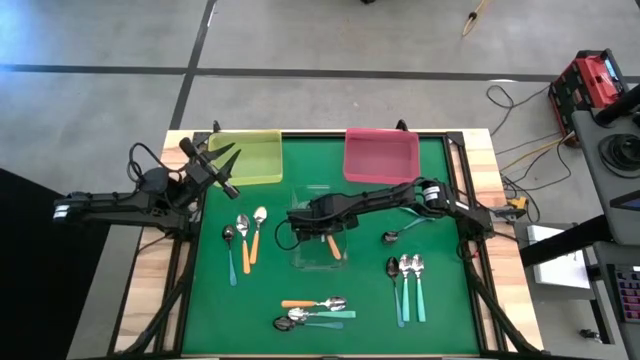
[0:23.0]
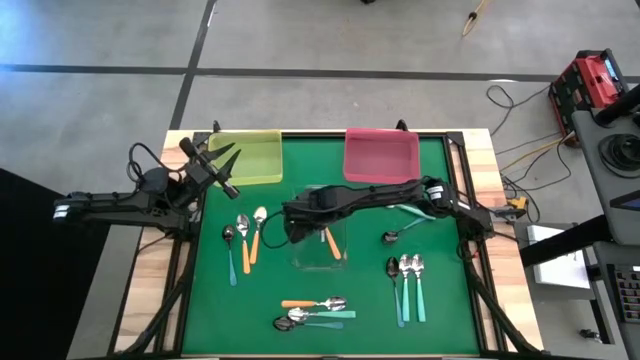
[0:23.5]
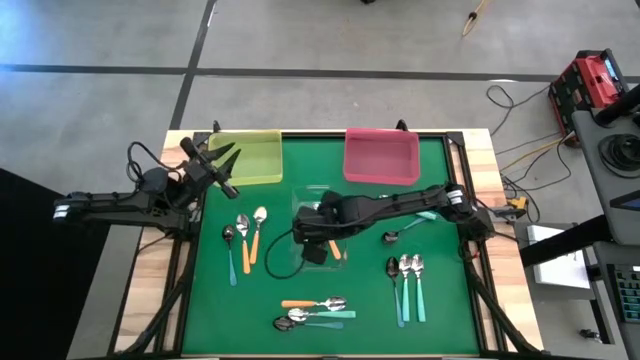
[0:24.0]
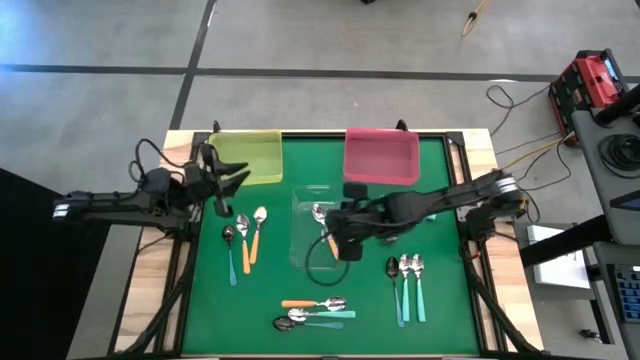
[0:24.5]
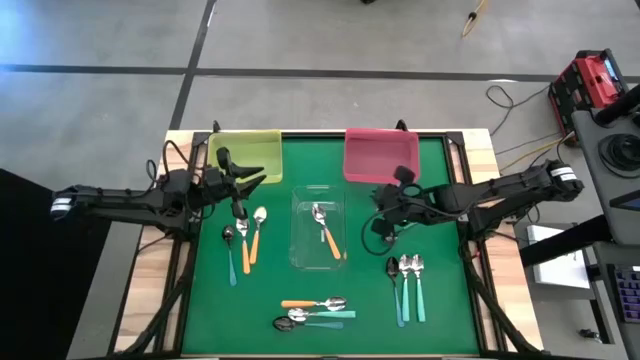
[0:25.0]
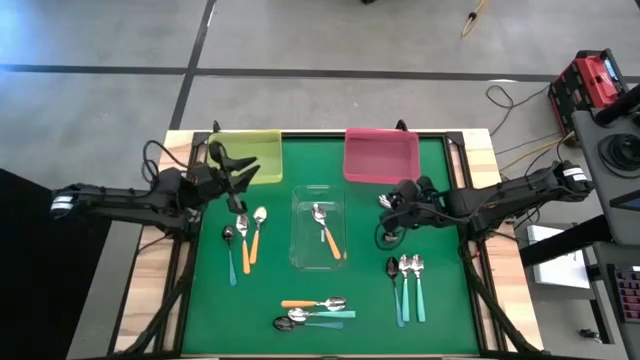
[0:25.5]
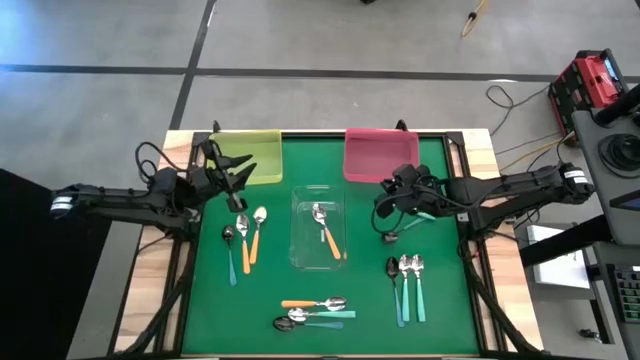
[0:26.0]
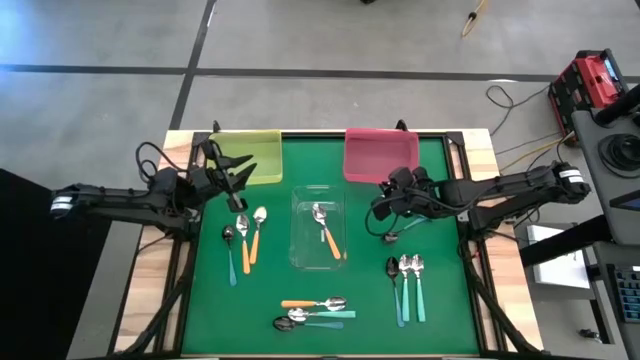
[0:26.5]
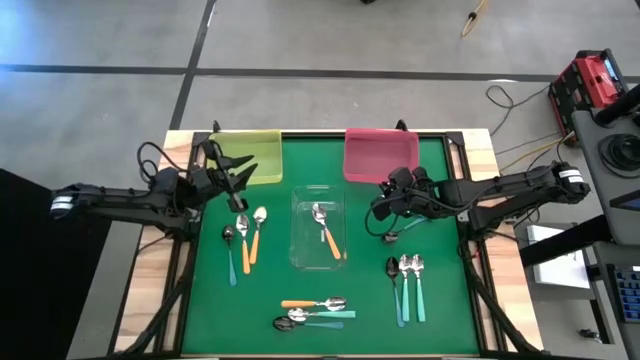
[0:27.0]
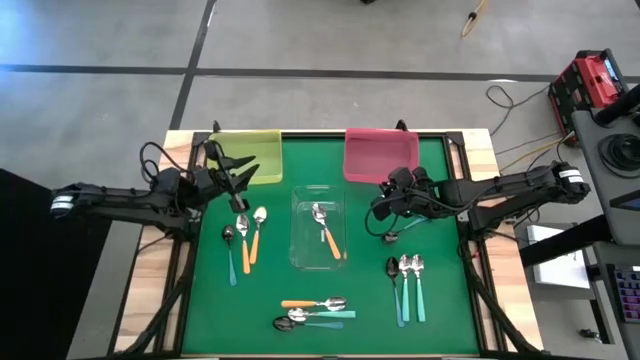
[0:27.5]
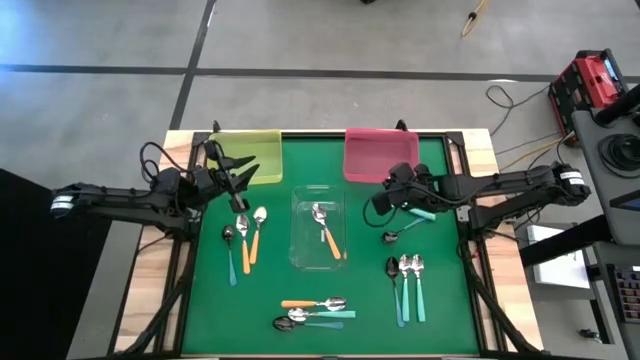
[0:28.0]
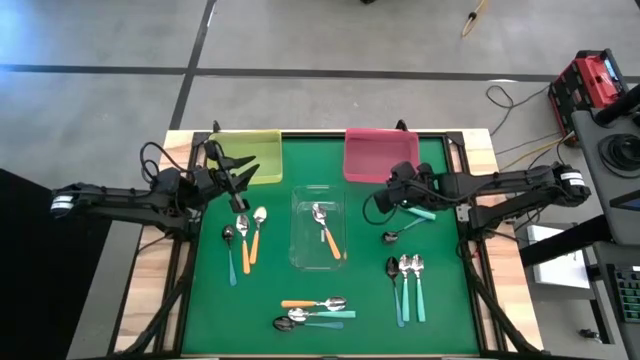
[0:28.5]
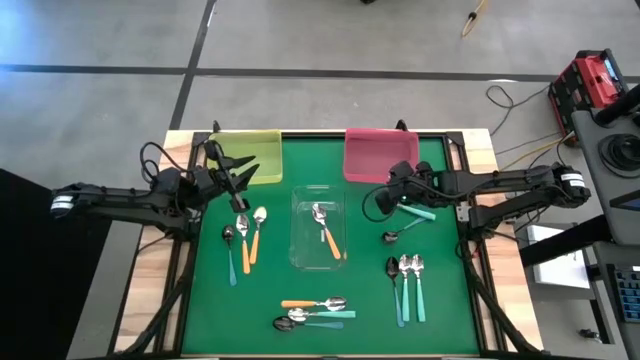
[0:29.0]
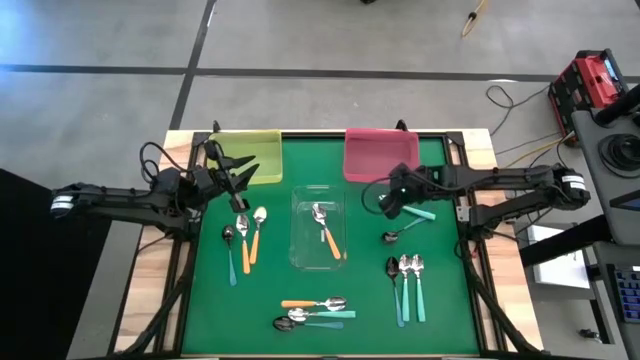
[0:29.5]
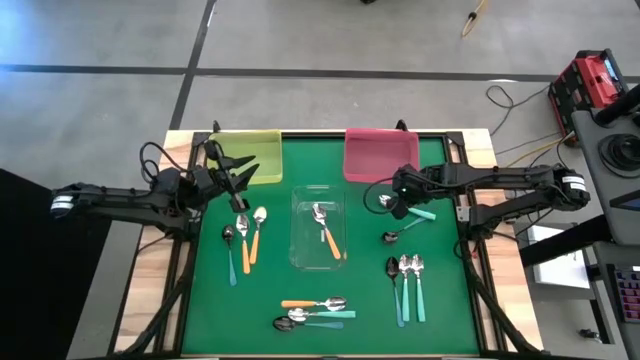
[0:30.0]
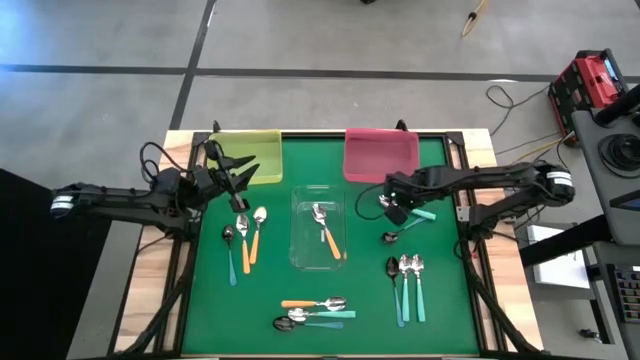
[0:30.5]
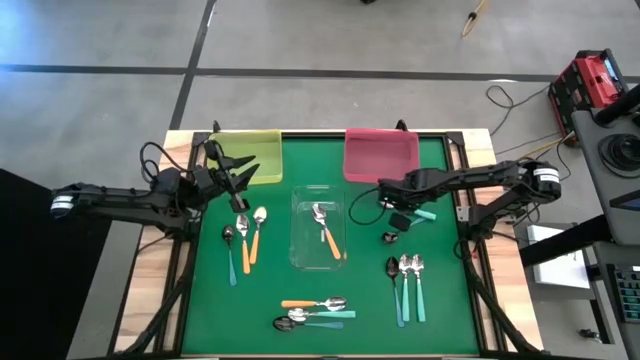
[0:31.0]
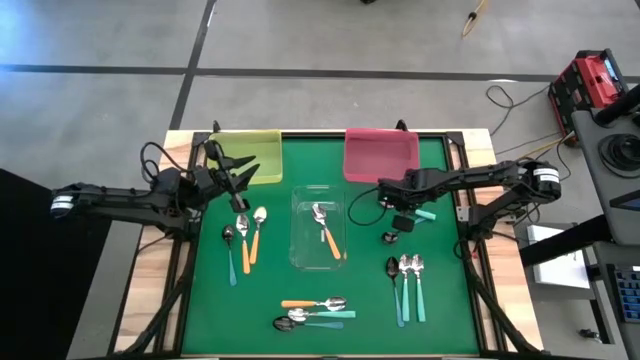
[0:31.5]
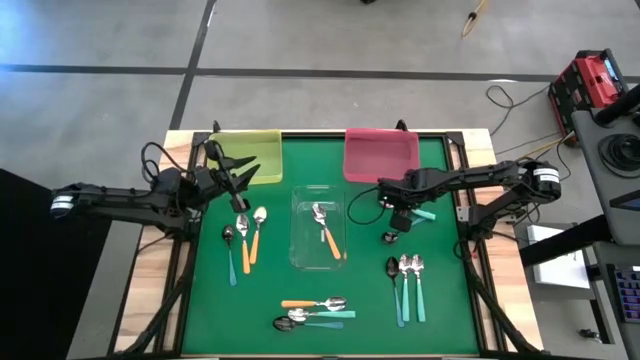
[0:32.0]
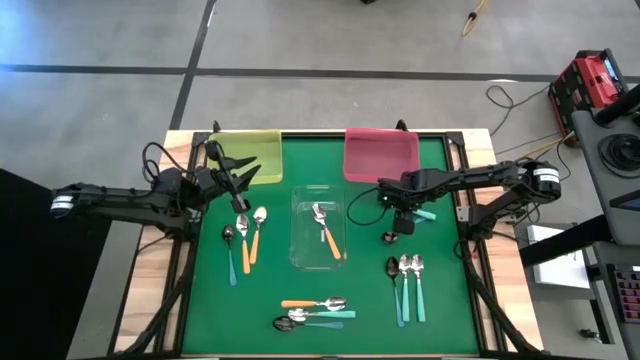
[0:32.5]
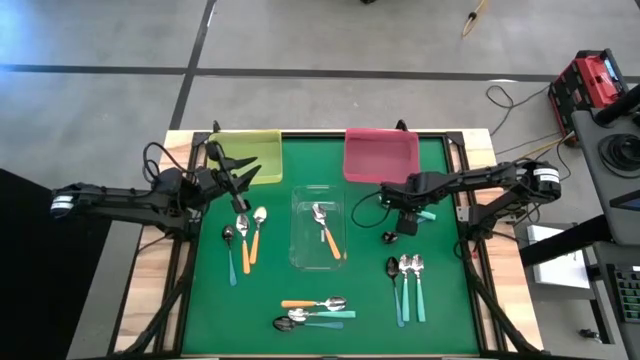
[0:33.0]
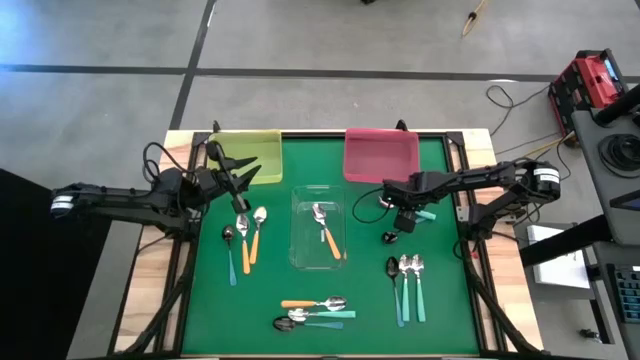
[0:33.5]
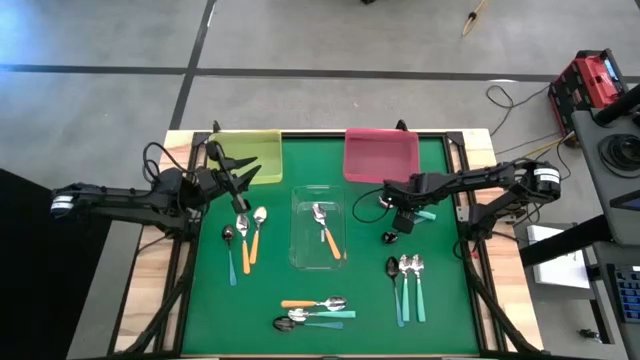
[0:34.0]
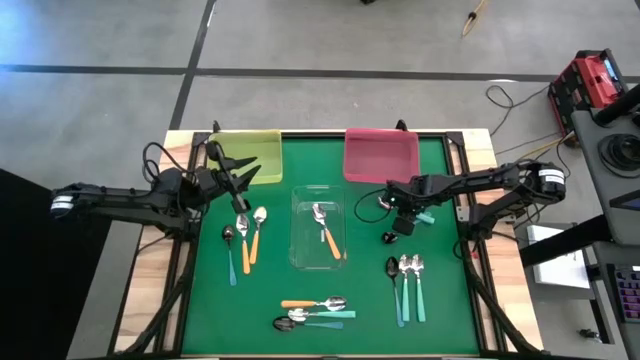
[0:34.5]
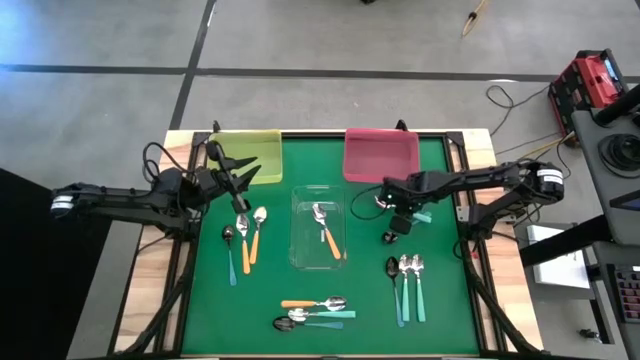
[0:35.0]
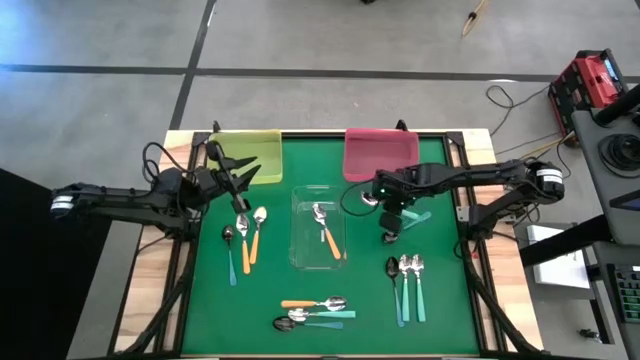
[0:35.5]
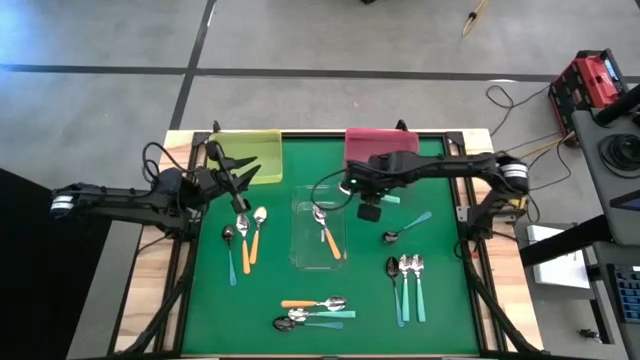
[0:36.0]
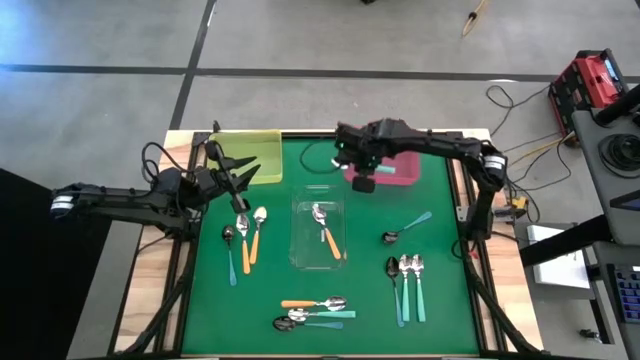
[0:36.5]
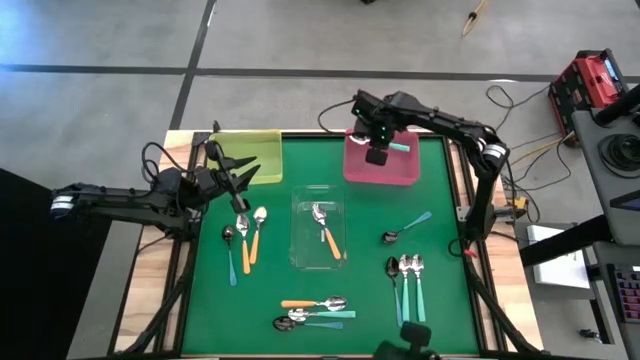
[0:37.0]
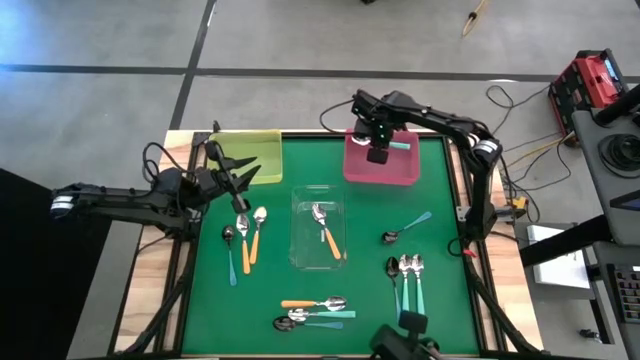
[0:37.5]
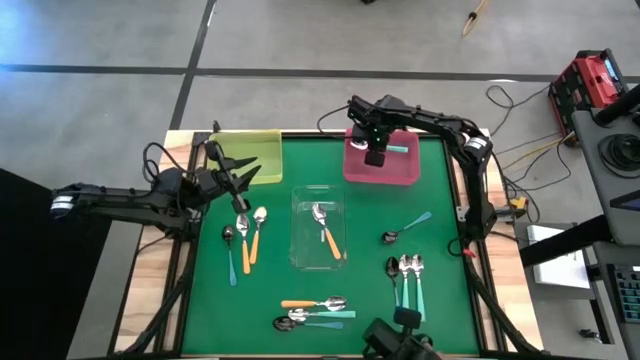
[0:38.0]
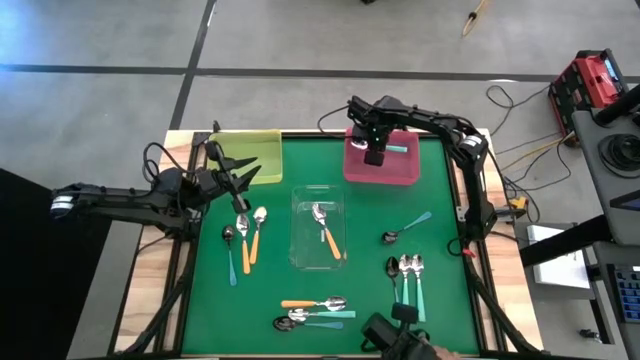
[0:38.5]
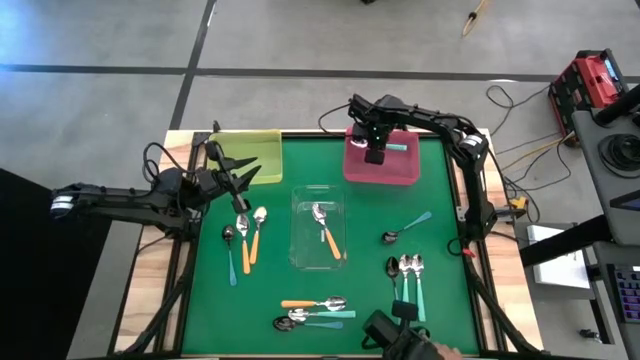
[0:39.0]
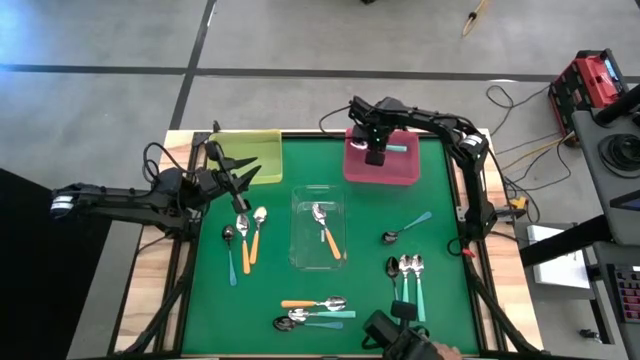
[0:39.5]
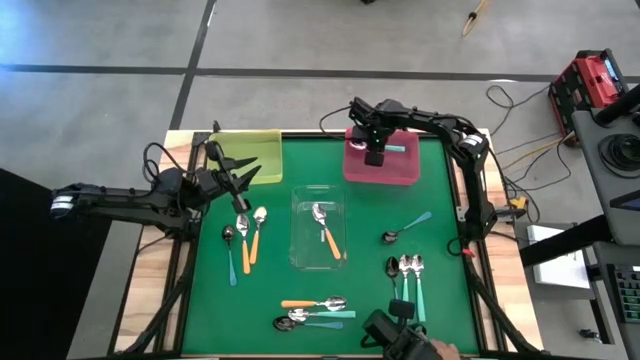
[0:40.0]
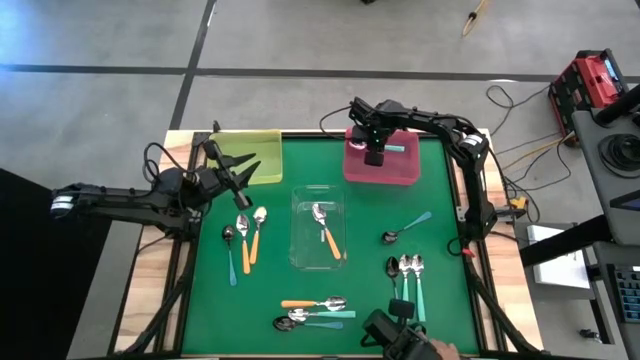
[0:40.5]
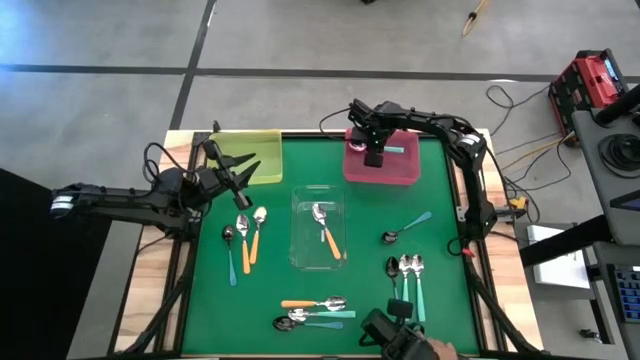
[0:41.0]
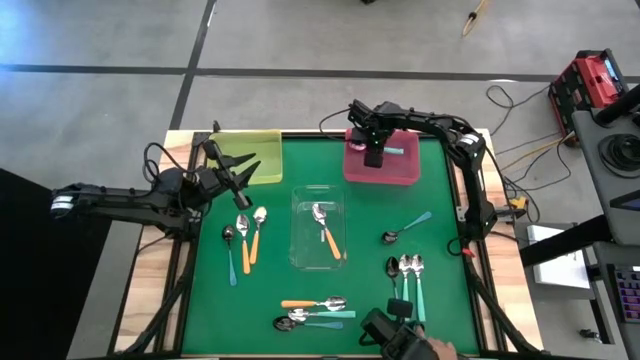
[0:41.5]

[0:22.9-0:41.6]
Task: Sort silverware by color (type)
Put the top right light blue spoon into the pink bin

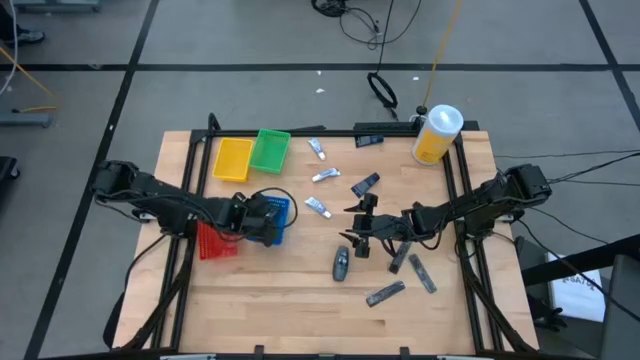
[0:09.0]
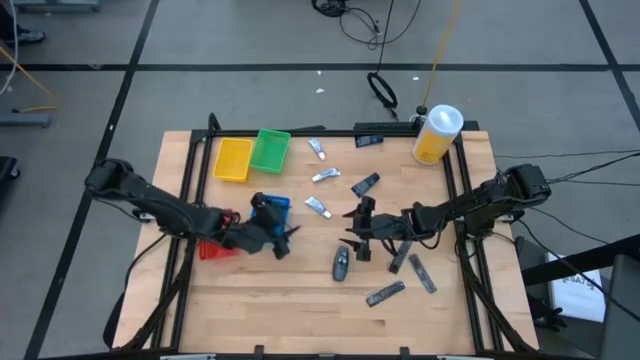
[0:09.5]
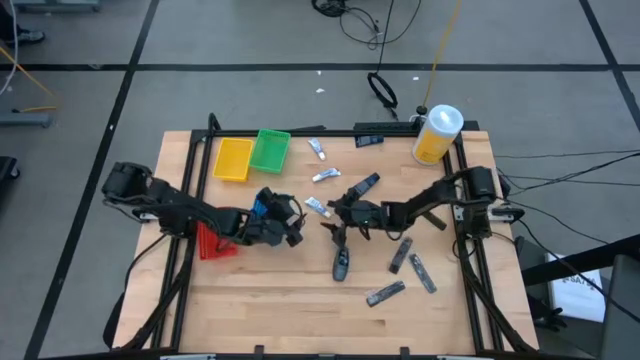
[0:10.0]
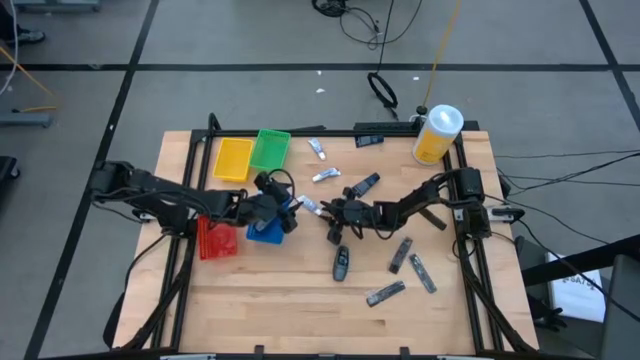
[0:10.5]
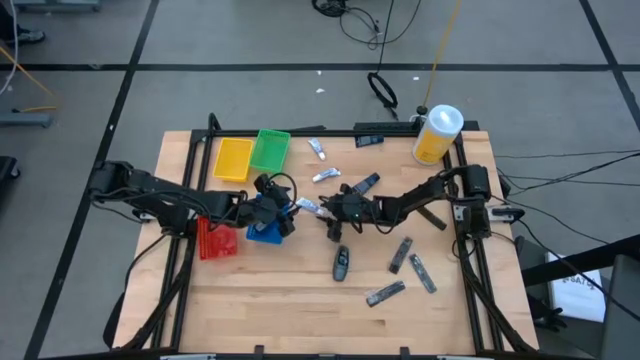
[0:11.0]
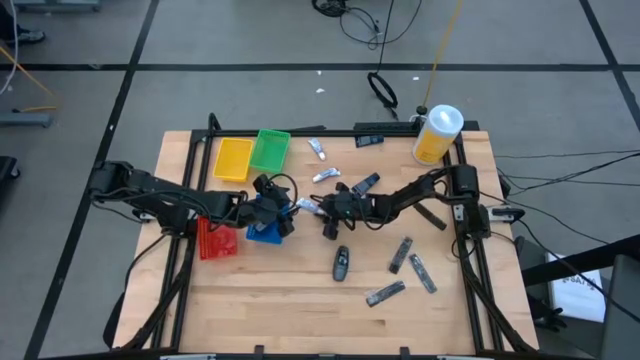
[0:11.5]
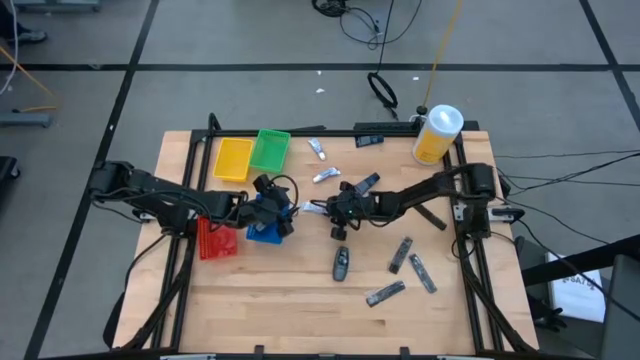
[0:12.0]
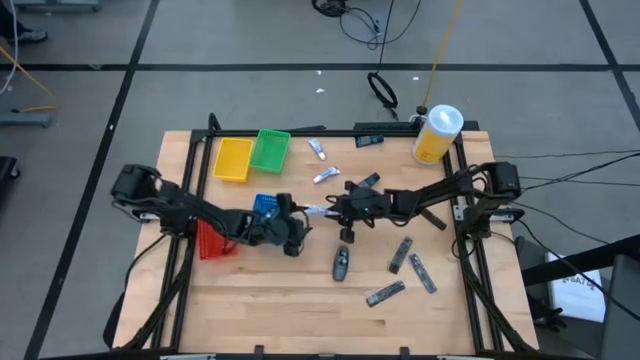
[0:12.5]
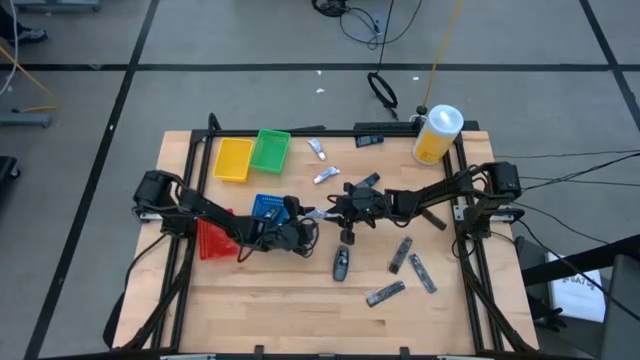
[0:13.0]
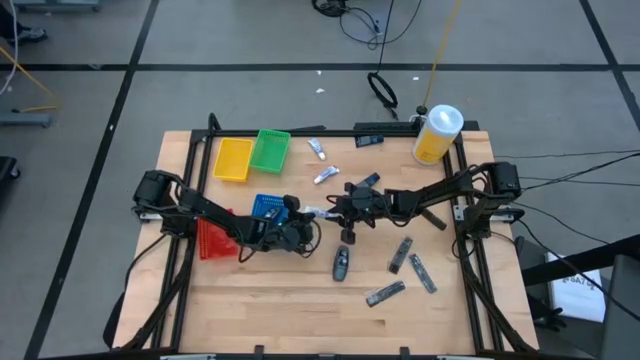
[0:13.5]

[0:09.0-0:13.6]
Task: Pick & Place Travel size toiletries
Put the white toothpaste into the green bin
